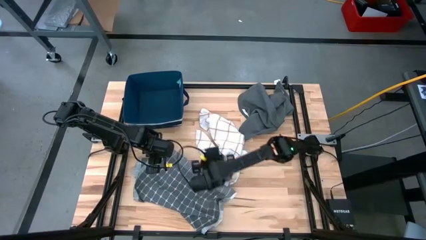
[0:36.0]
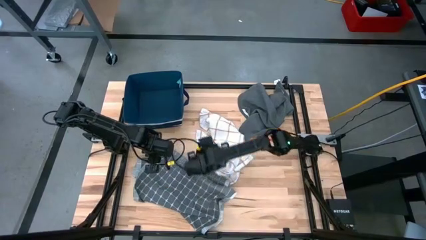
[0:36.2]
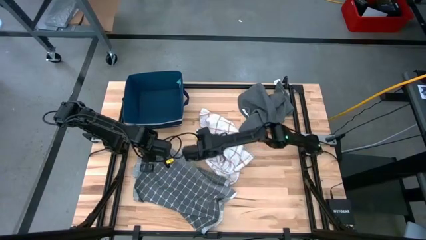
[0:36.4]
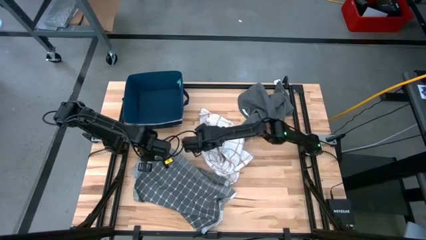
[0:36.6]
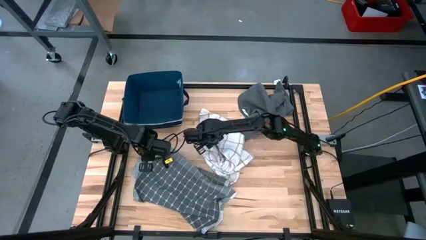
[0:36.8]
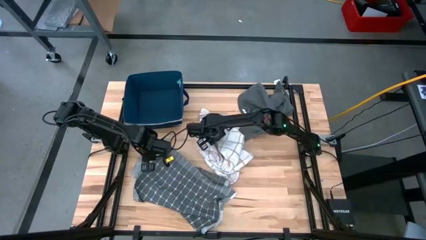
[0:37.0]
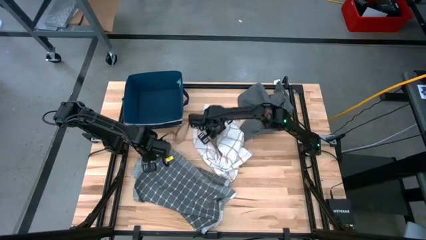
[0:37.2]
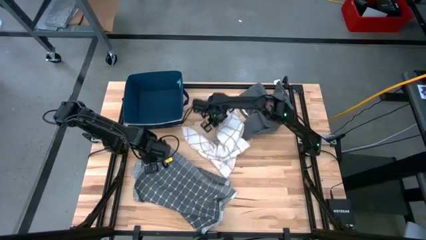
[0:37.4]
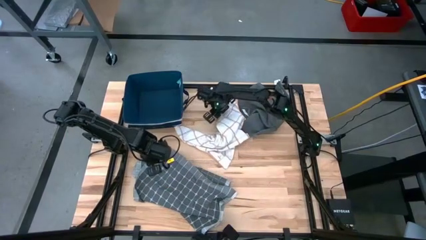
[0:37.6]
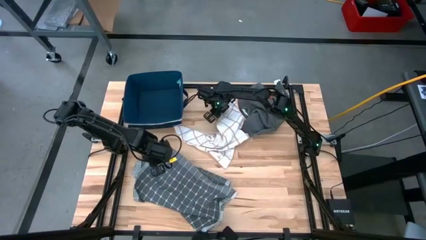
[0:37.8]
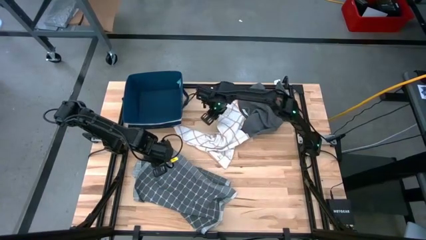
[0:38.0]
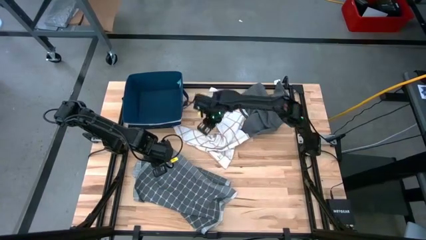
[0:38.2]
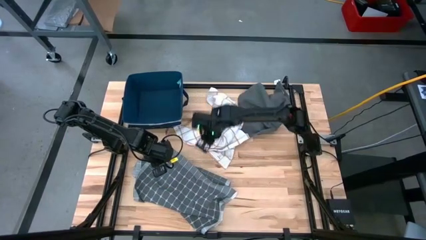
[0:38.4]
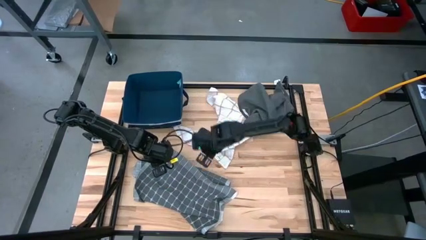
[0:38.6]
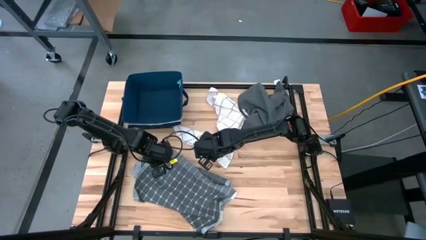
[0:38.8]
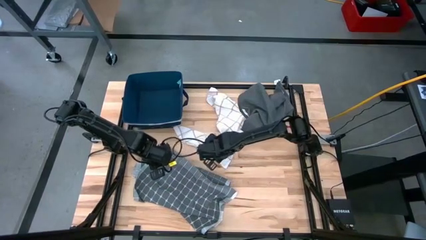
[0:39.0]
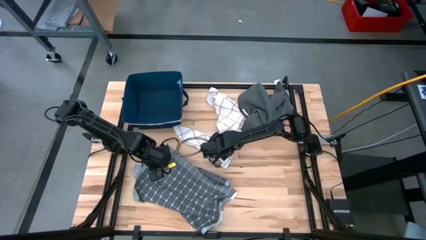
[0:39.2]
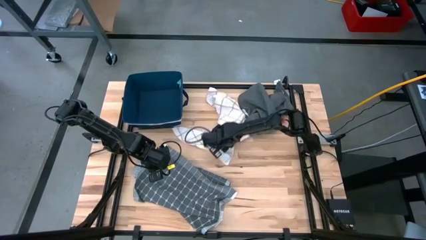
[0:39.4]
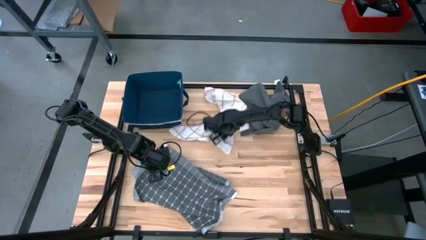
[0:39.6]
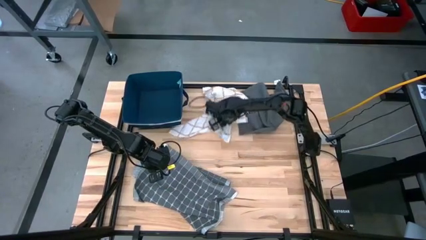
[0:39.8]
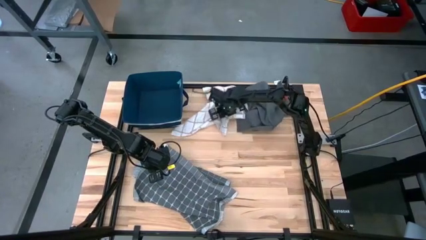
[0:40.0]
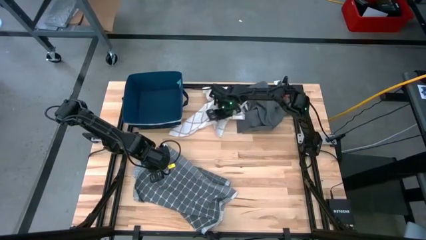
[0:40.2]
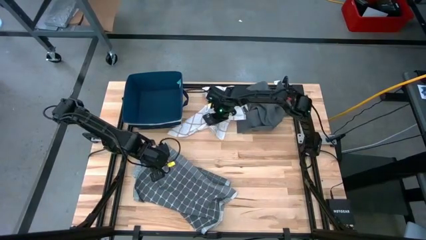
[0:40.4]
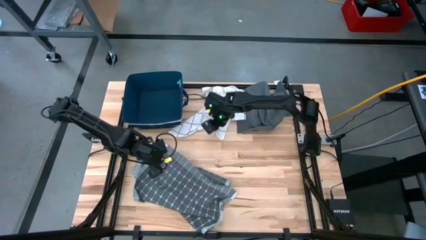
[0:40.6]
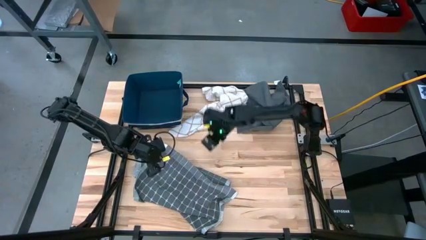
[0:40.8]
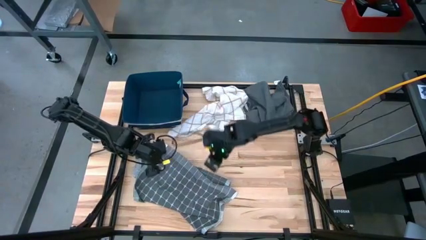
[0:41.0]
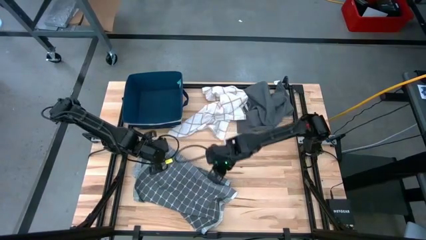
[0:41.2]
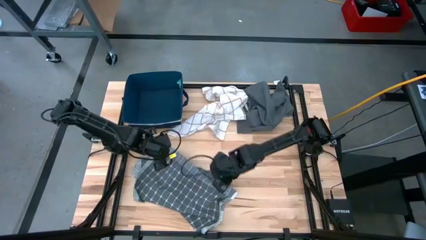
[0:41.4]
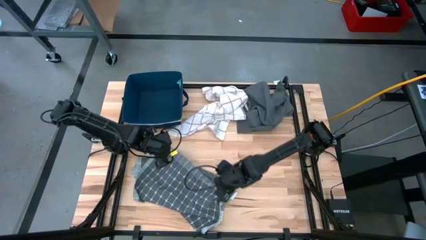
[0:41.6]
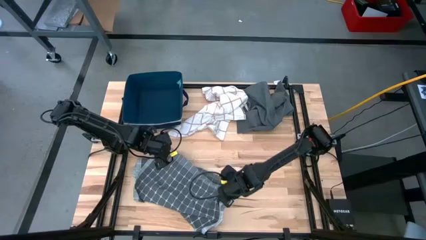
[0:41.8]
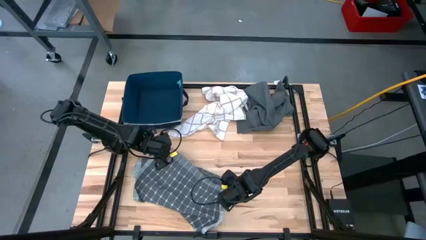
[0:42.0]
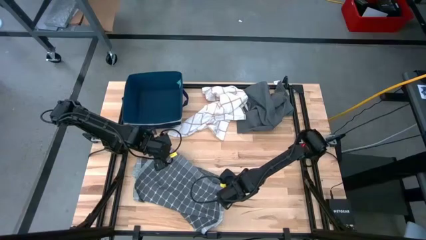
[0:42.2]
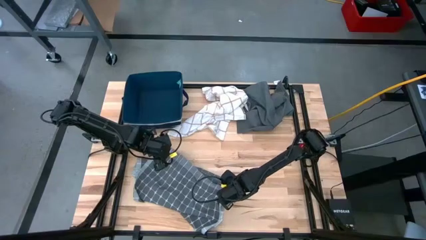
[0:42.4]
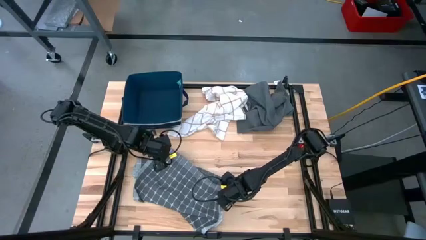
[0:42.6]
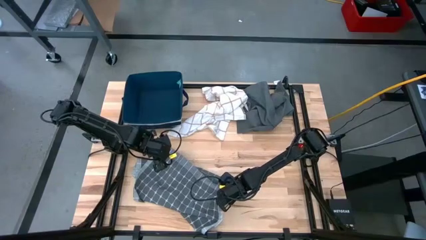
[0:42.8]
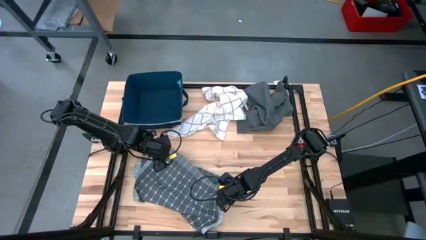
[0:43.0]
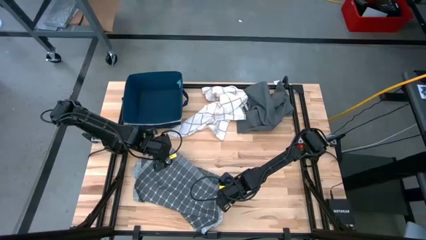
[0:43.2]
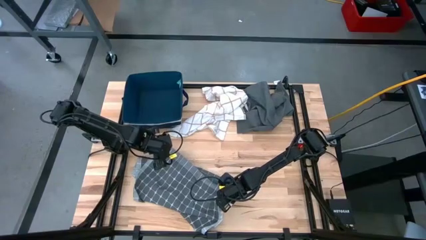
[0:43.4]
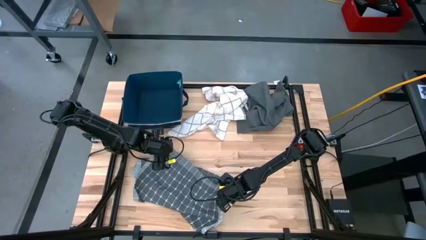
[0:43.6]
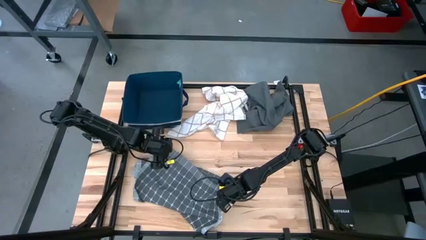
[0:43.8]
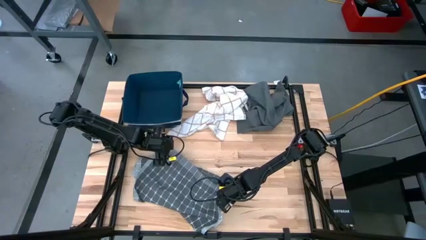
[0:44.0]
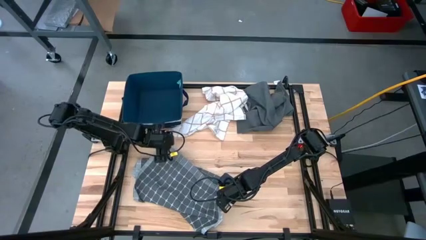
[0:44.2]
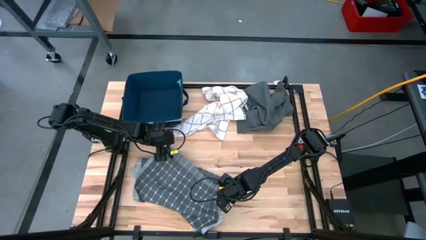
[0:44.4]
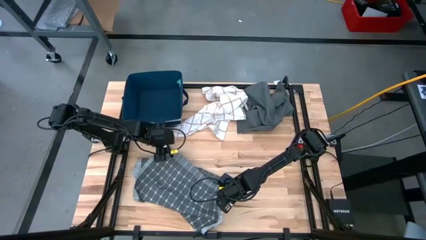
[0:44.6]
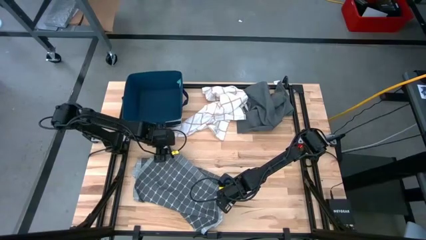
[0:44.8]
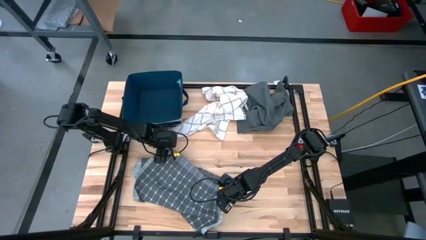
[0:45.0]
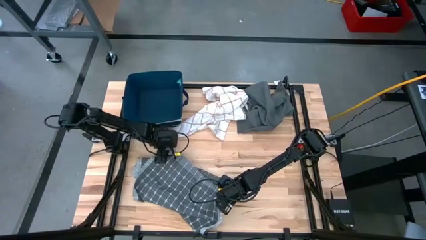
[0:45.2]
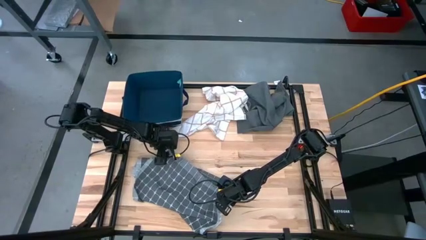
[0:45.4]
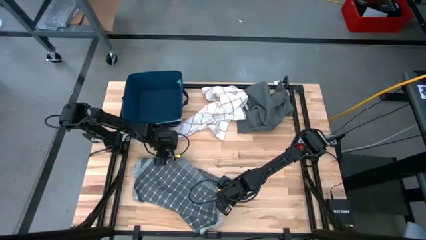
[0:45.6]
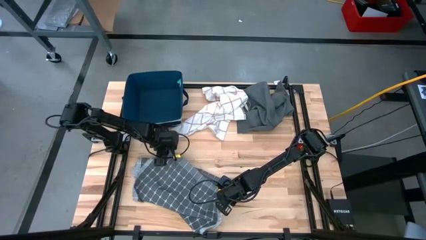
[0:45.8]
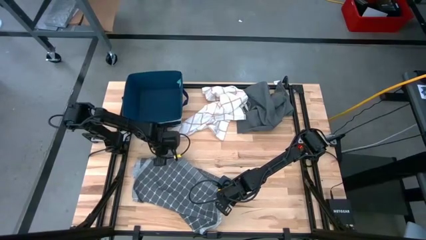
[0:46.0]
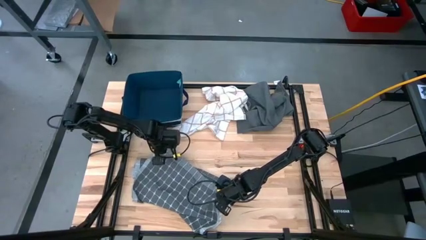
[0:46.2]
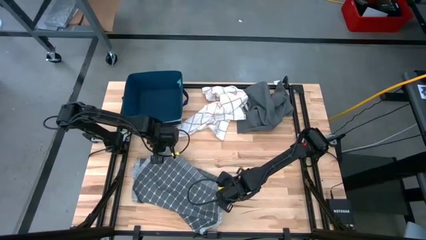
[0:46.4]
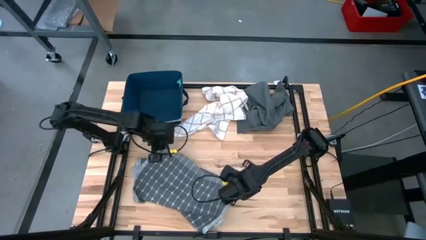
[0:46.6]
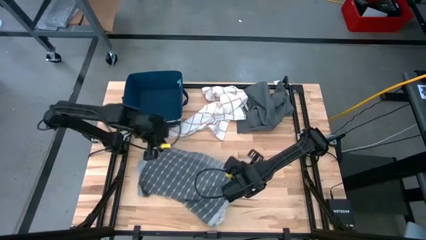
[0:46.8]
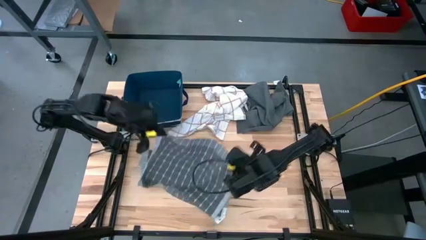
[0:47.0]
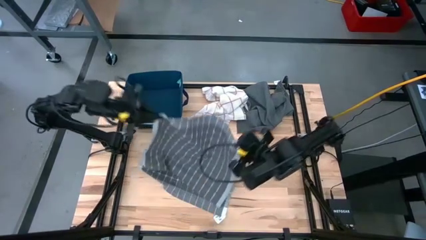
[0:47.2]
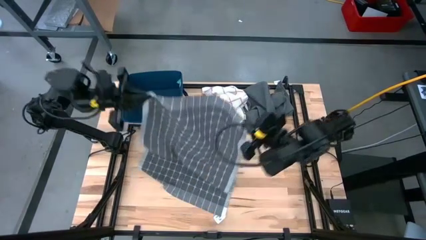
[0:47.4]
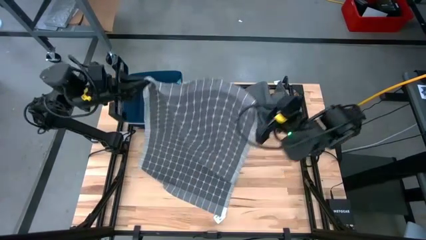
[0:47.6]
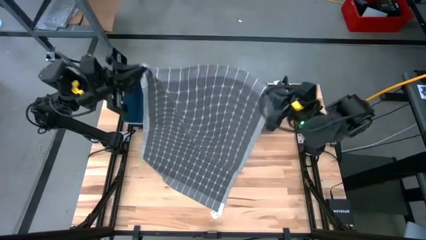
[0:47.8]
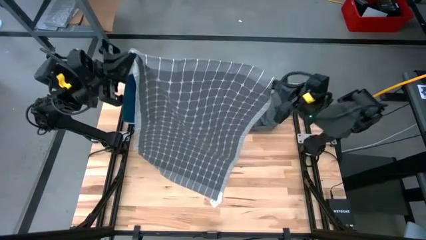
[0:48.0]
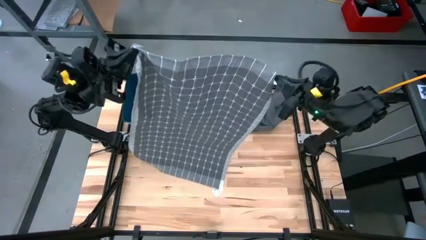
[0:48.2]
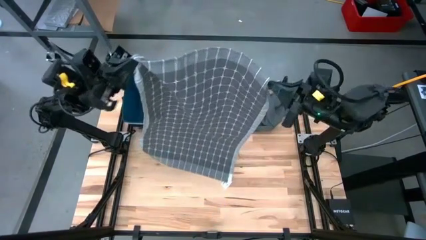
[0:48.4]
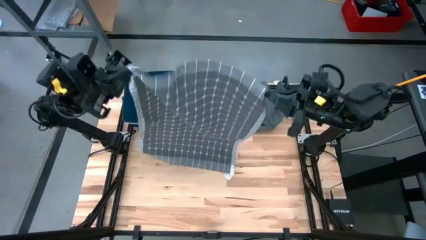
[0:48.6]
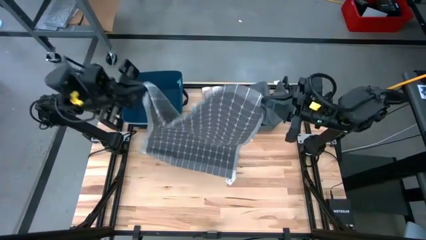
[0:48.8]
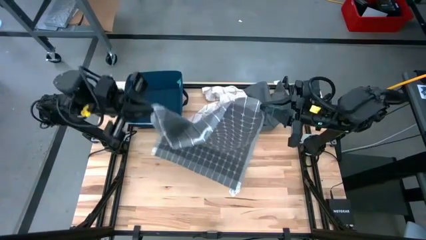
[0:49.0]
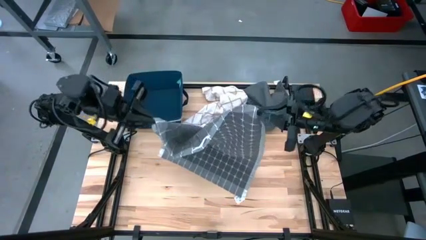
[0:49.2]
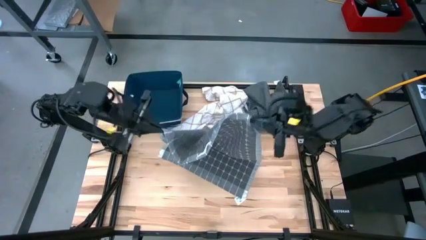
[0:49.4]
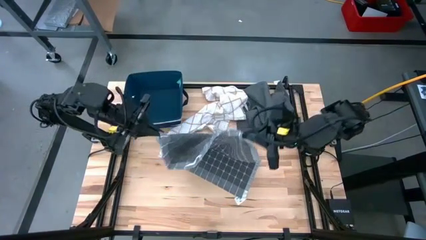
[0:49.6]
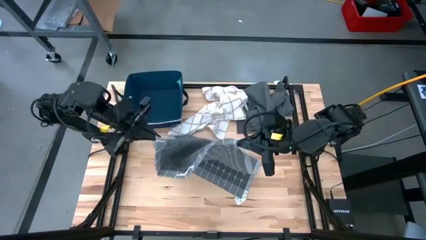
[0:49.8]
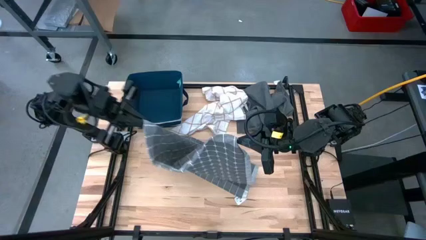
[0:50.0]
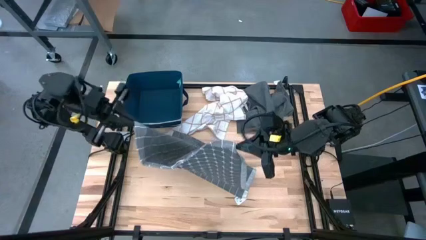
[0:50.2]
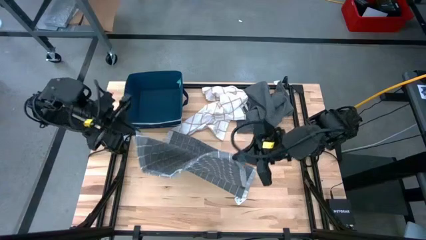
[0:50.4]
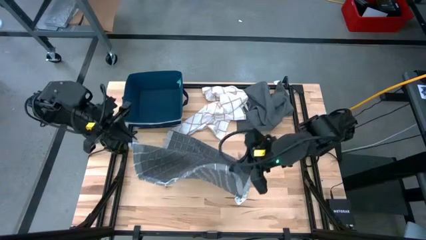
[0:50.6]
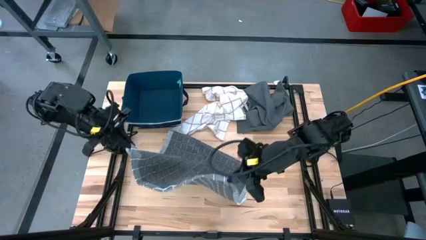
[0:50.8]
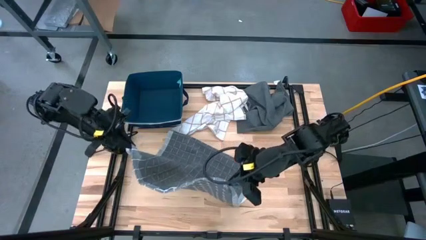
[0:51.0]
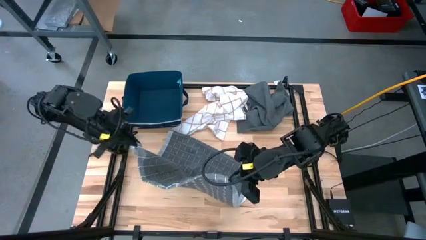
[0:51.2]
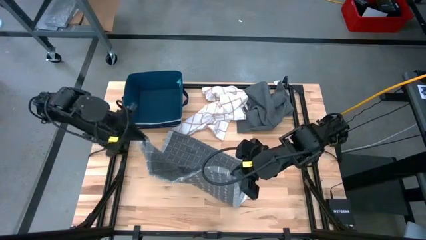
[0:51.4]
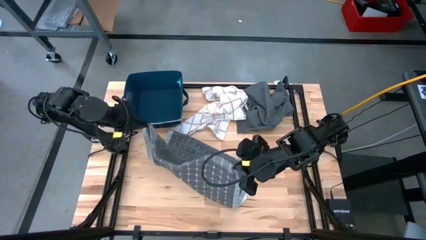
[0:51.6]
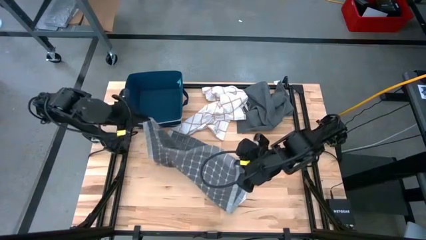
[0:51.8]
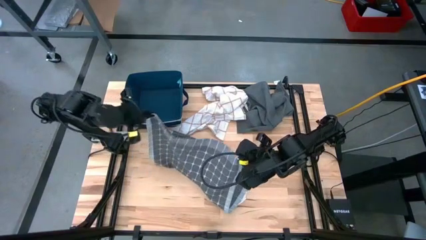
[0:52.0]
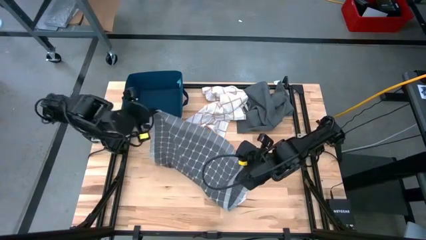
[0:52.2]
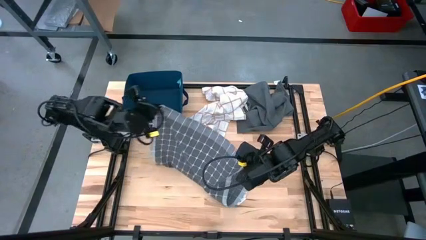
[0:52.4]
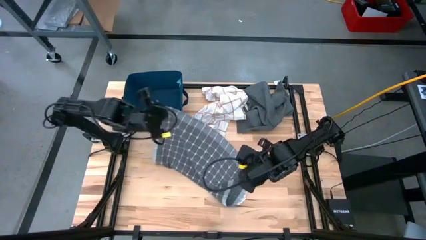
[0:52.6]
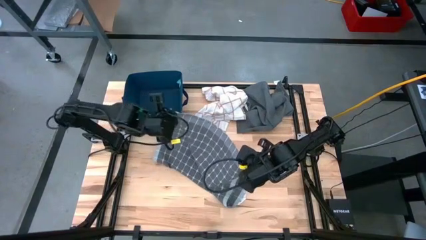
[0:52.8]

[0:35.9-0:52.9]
Task: Fold towel
Fold the gray patterned towel
